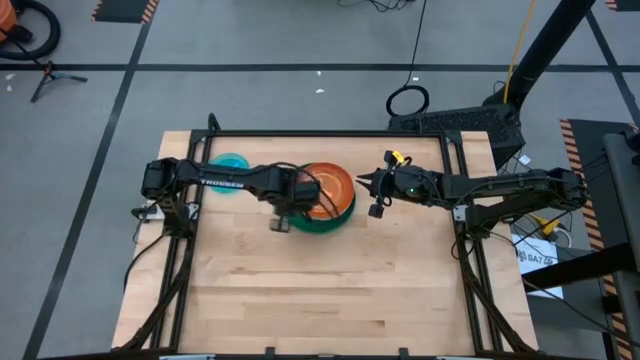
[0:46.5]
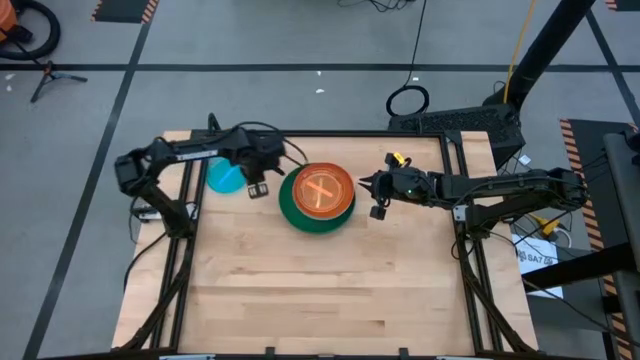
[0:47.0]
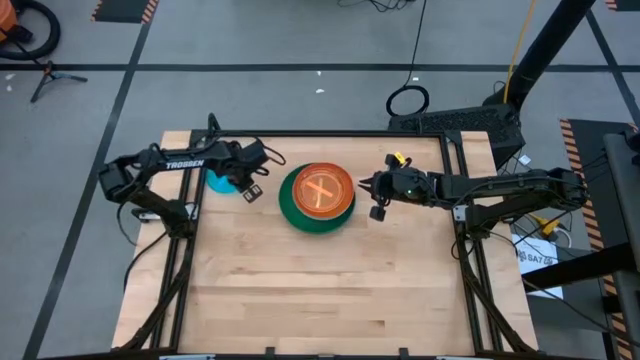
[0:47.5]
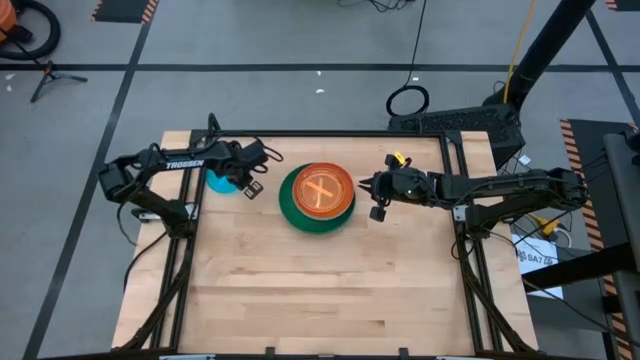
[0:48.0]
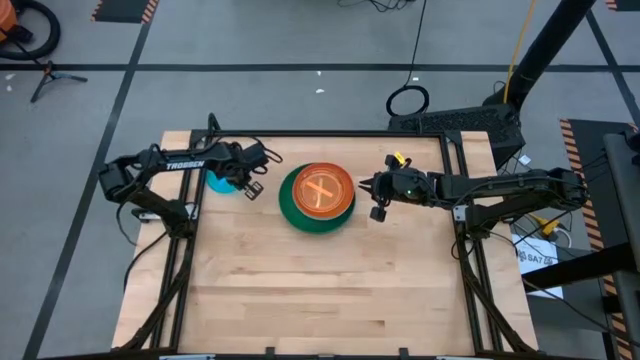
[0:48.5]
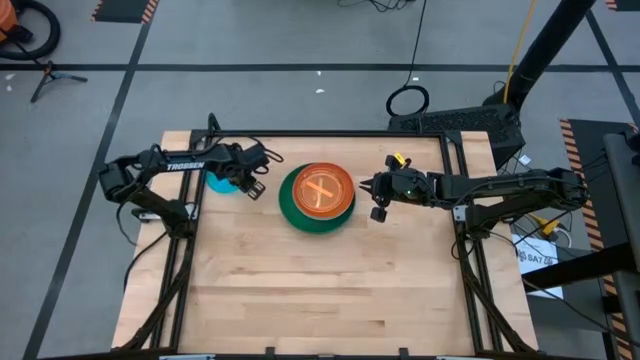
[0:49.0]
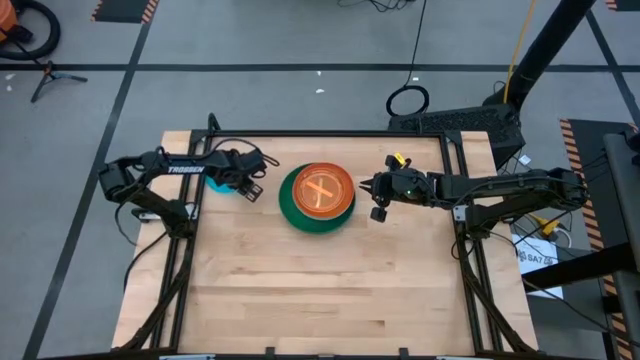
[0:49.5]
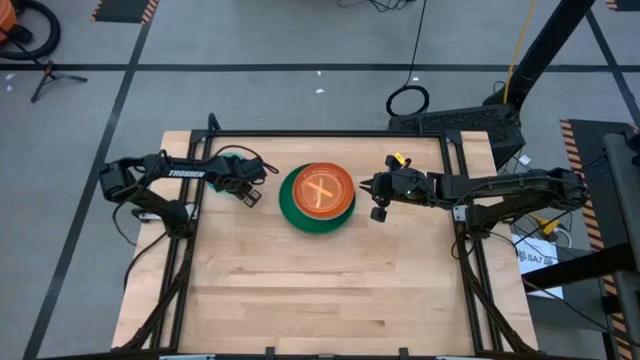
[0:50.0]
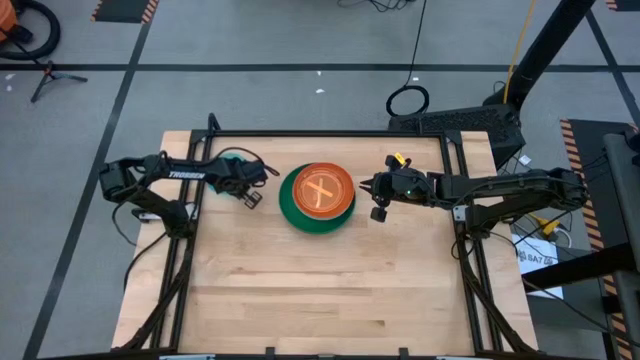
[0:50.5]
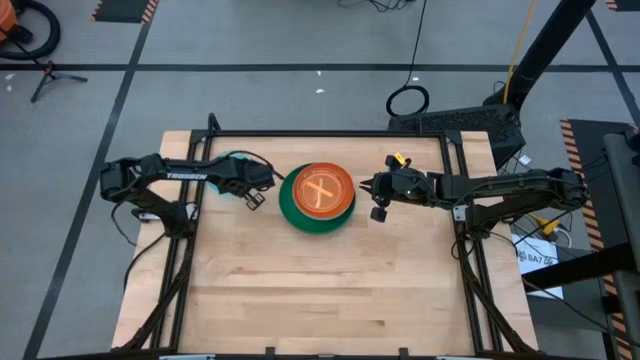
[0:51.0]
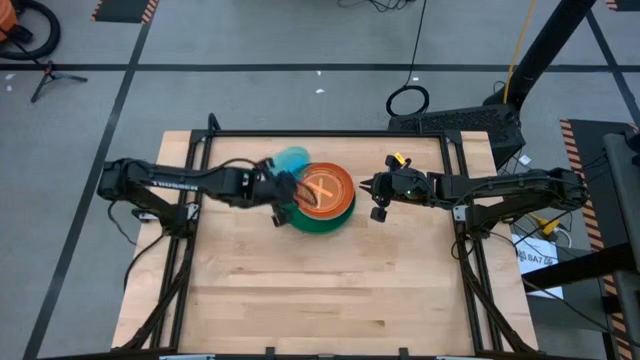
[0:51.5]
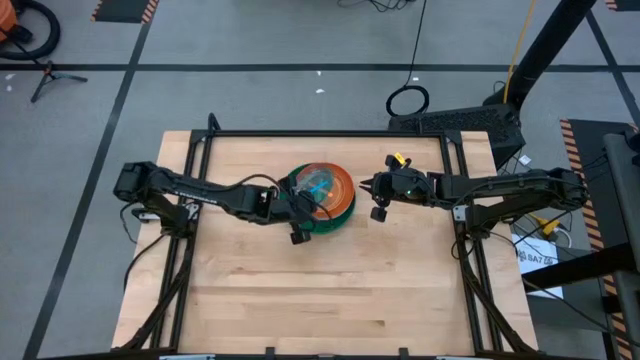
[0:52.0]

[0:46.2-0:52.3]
Task: Stack plastic plates
Stack the blue plate on top of the orange plate

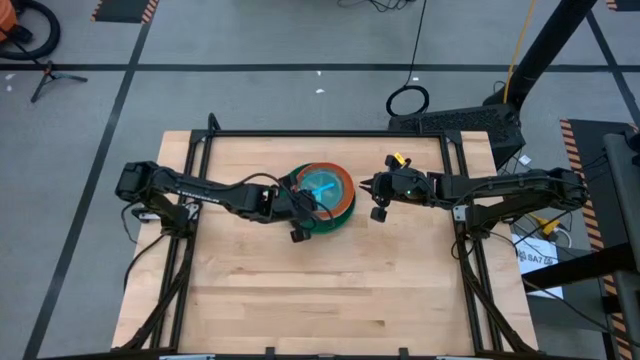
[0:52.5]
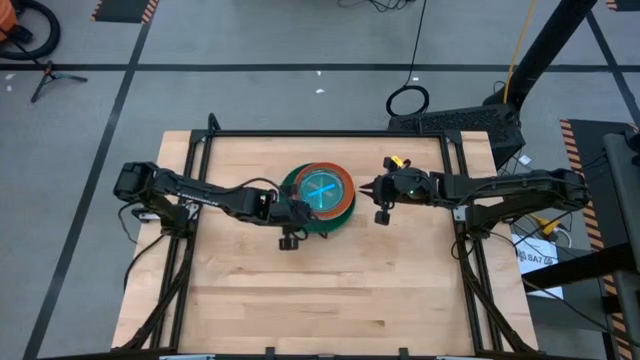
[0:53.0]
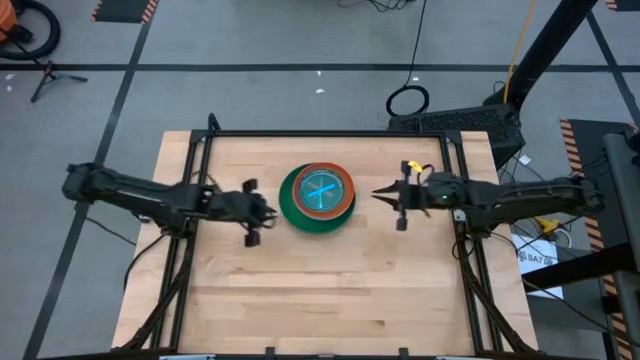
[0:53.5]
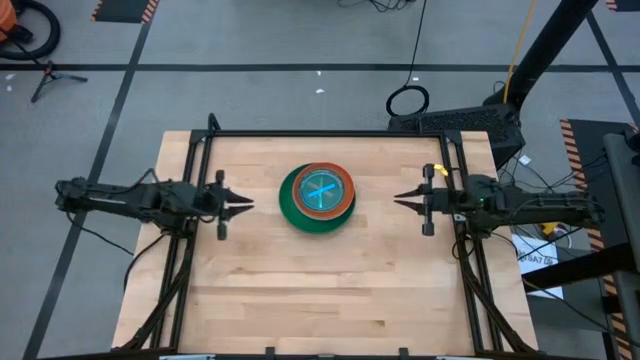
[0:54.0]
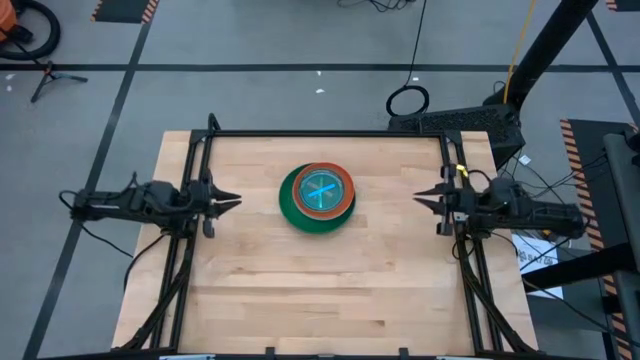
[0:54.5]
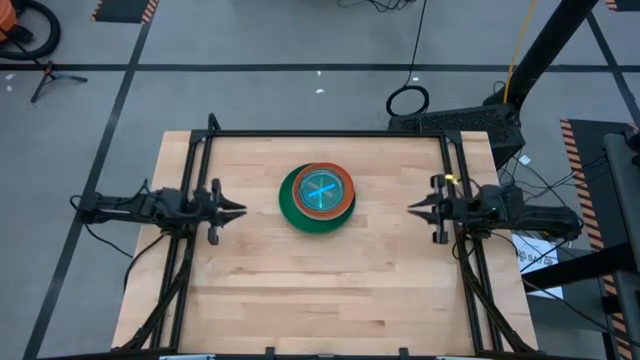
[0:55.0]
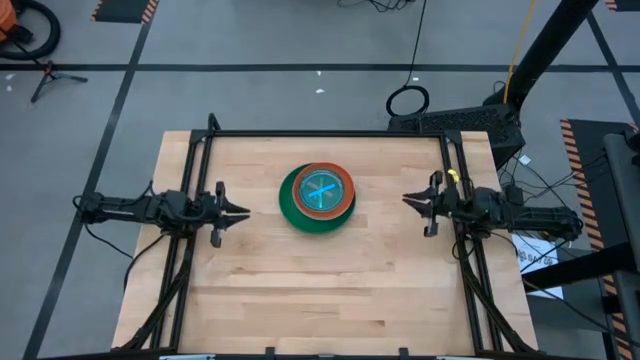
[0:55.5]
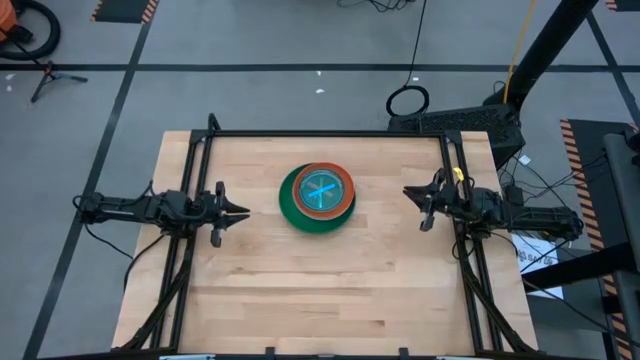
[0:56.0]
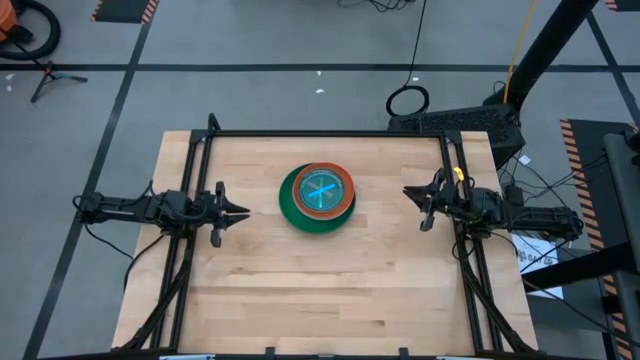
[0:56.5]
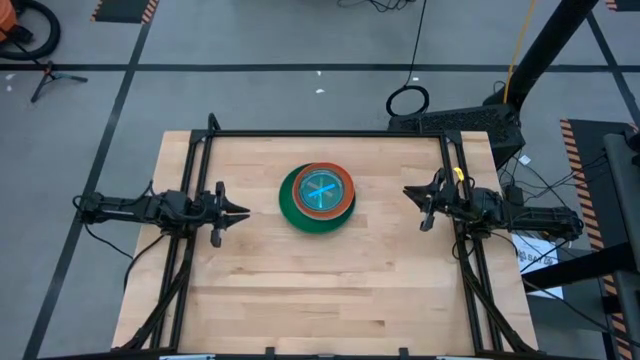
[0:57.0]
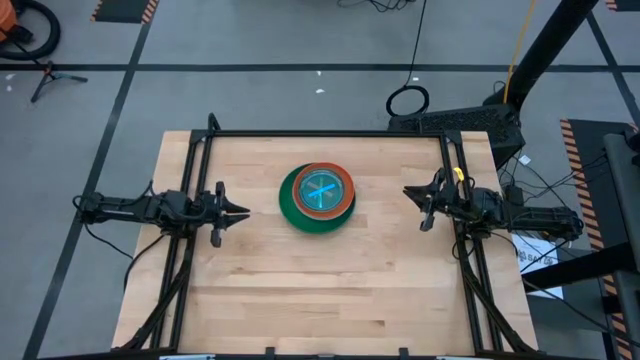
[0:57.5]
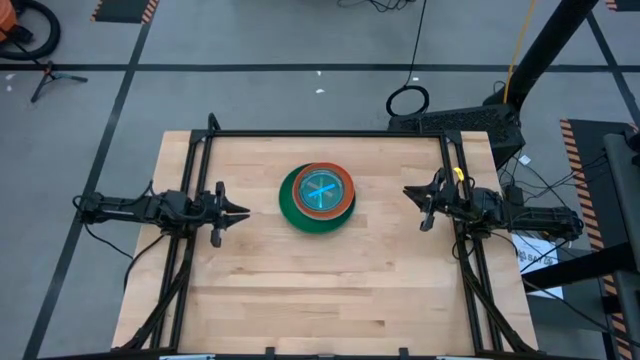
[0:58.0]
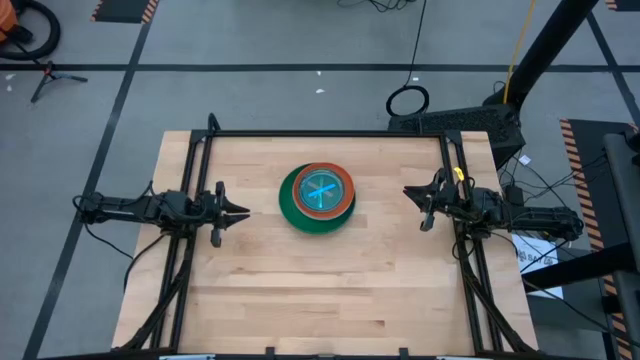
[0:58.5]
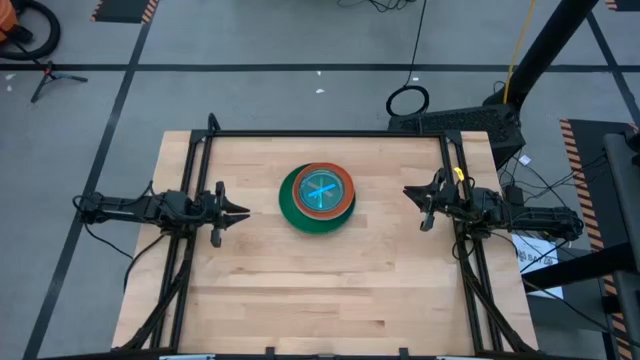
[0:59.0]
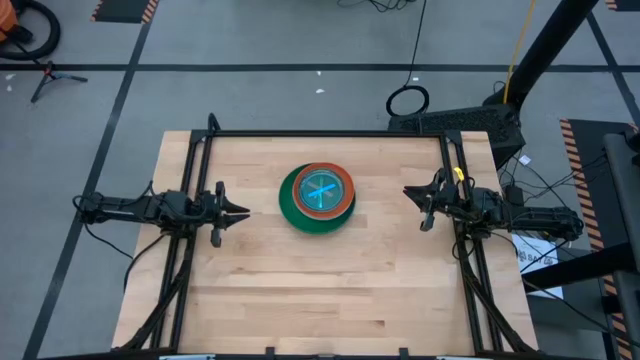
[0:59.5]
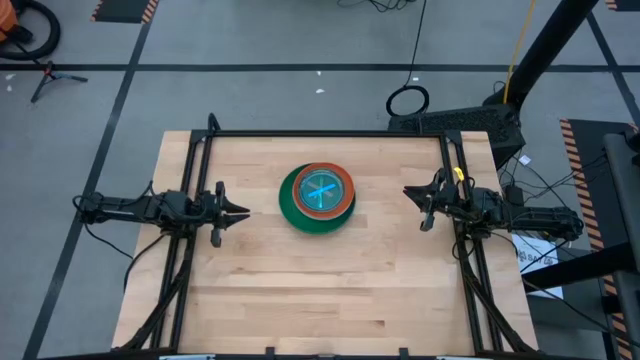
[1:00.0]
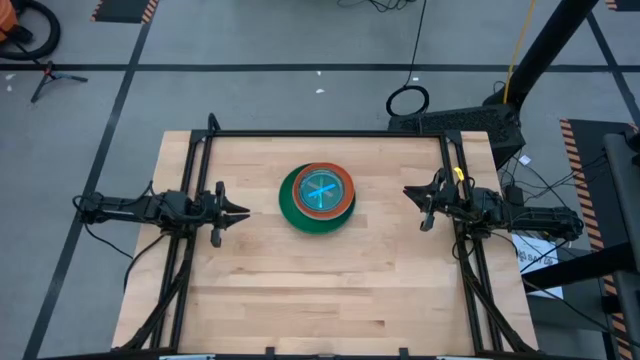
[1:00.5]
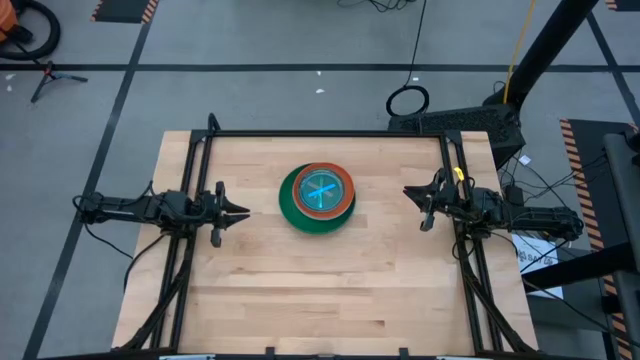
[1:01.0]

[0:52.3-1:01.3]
Return to Home Position

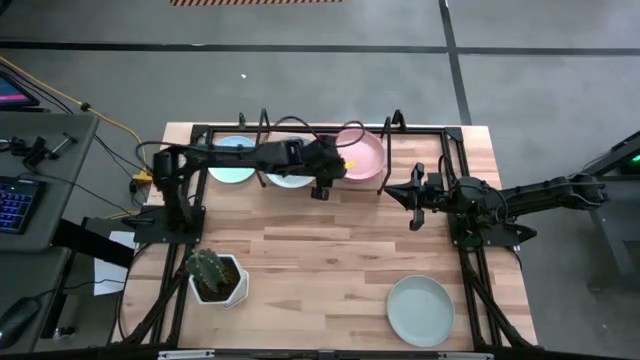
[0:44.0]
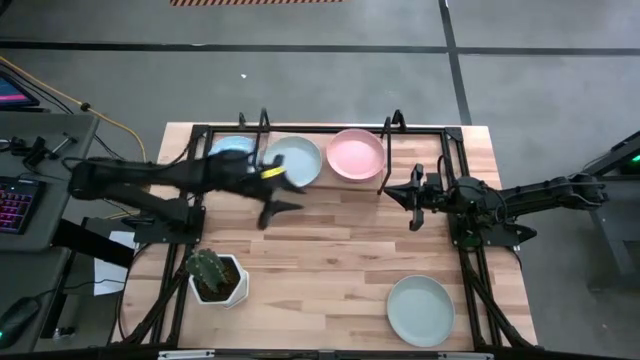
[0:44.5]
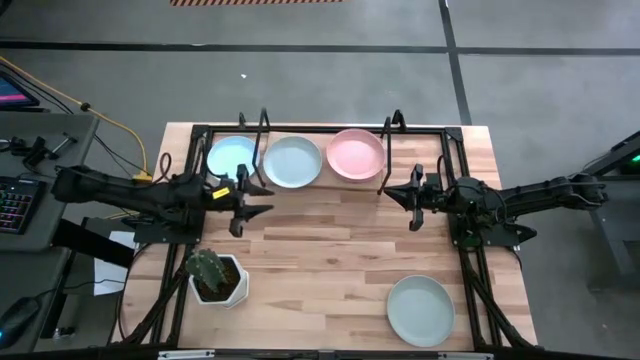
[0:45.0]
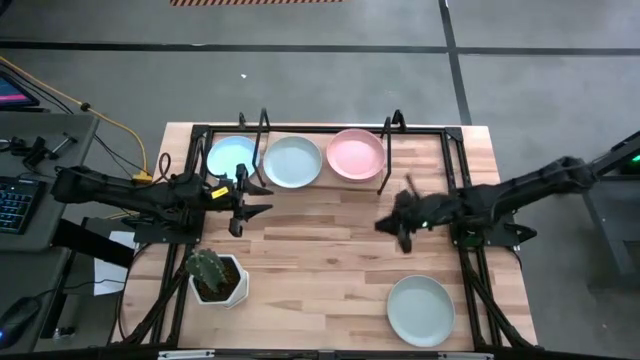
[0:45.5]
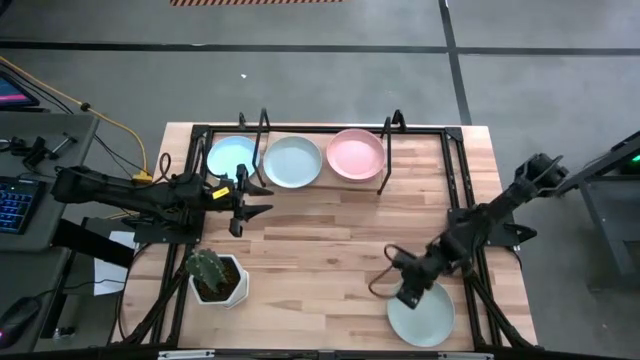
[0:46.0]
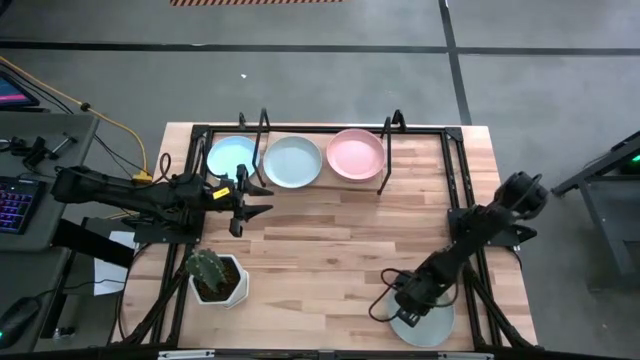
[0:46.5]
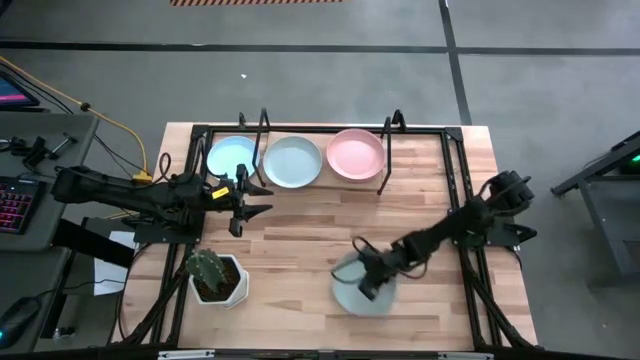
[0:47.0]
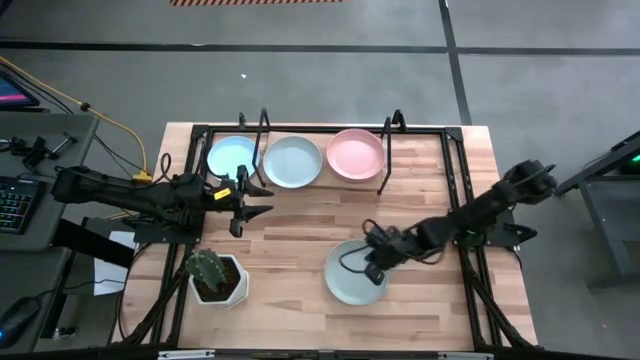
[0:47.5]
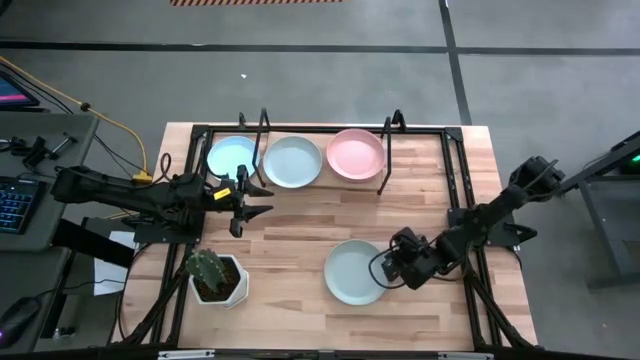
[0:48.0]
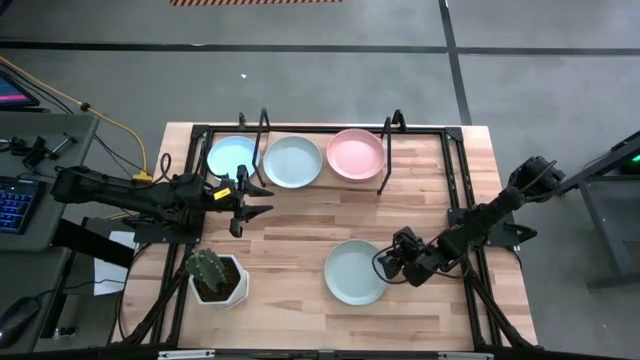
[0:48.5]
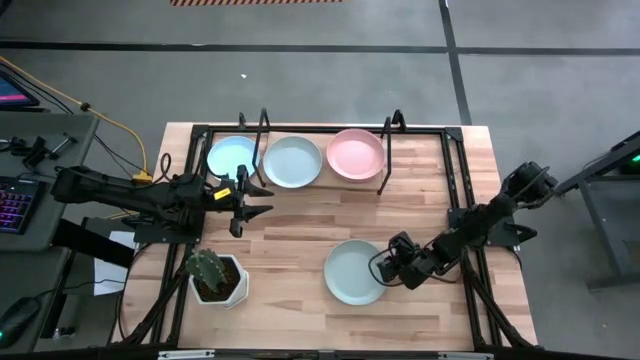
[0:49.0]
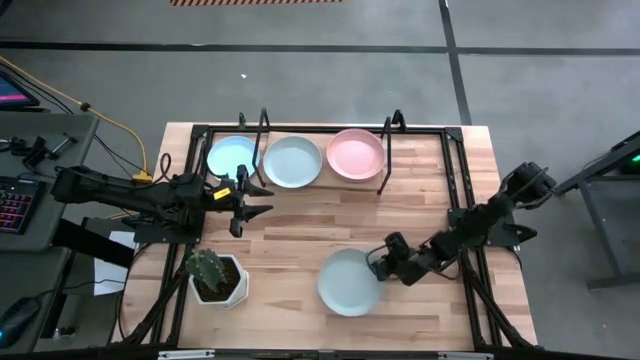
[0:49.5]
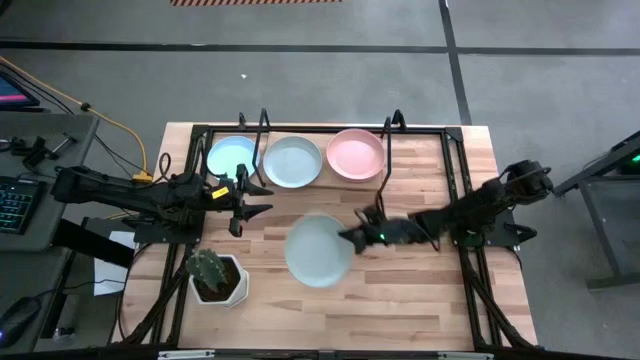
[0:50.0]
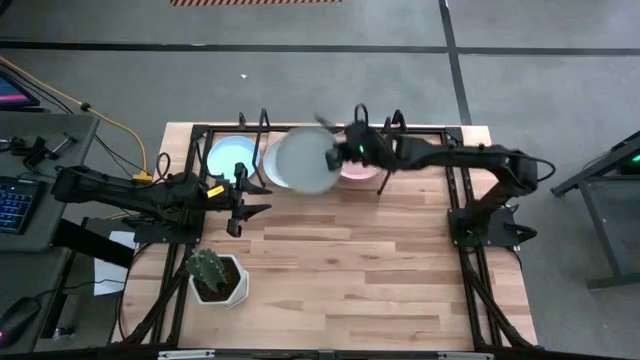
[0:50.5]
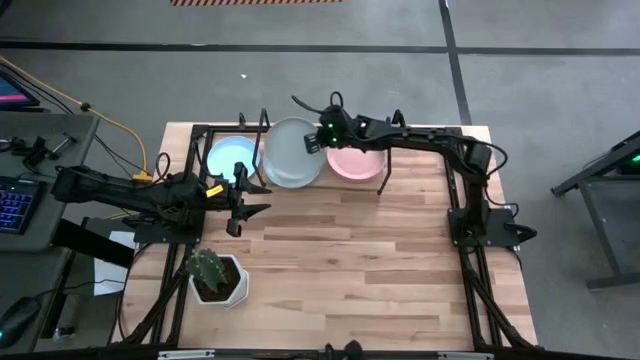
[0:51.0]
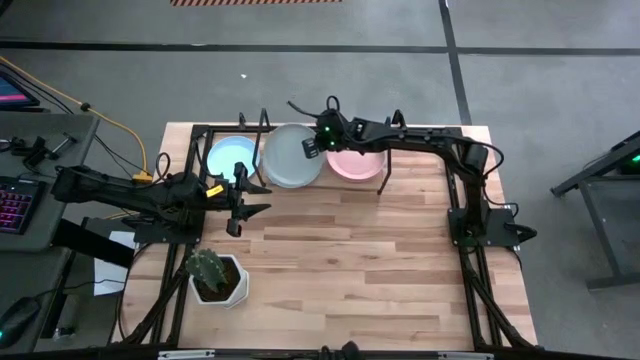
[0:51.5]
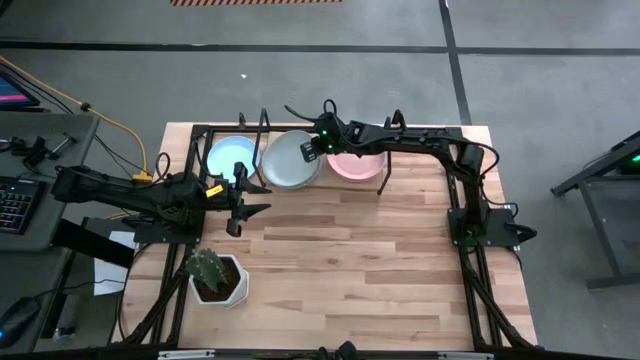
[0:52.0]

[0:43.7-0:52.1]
Task: Place and stack plates onto a shelf
Stack the white plate on top of the white plate on the shelf
